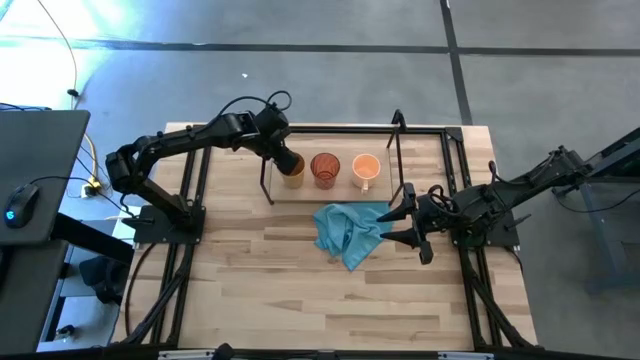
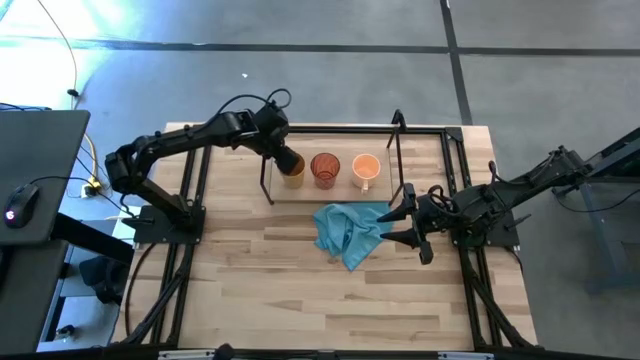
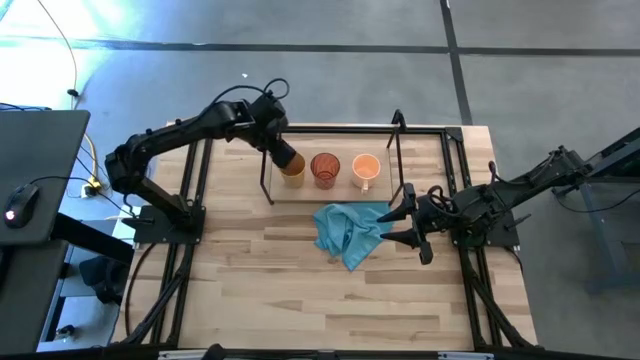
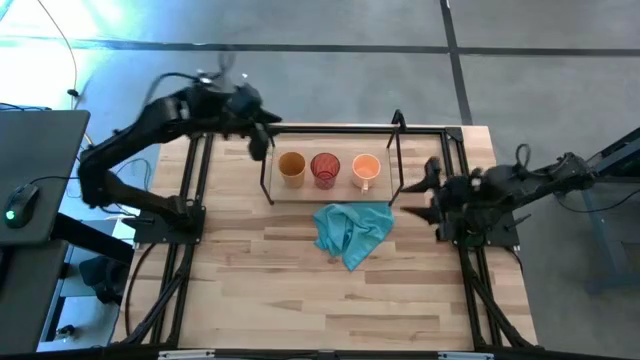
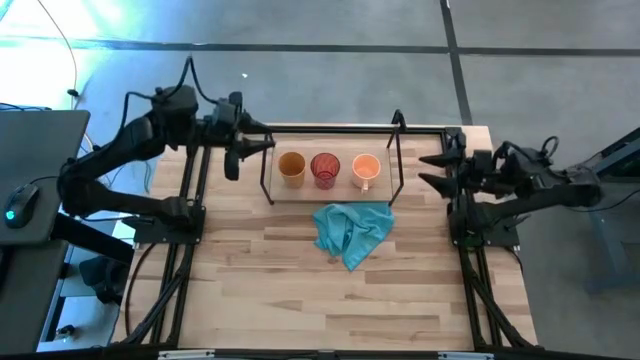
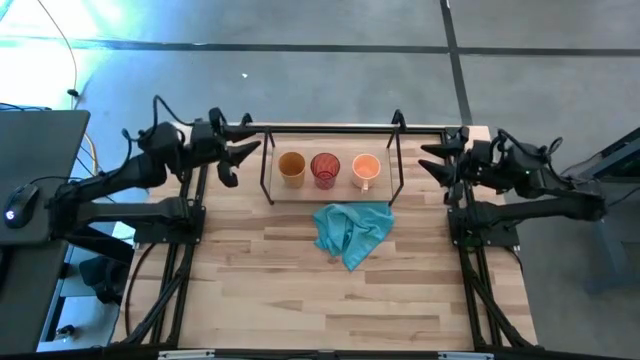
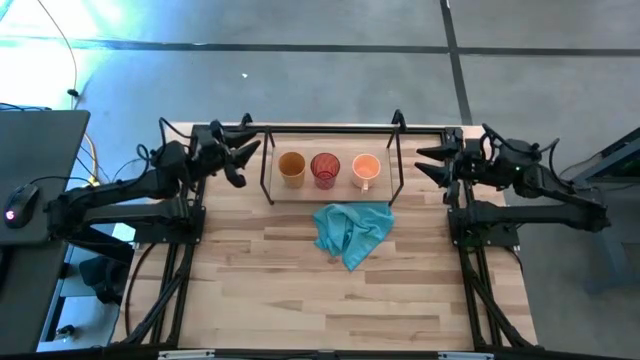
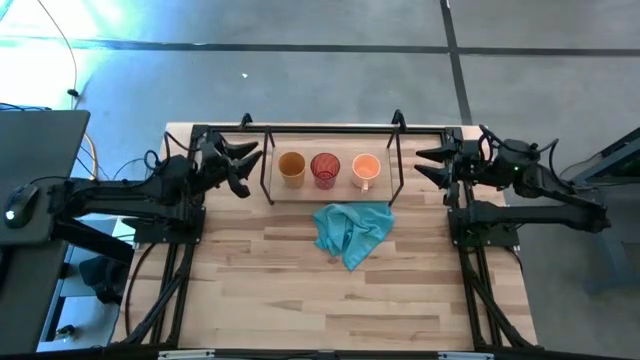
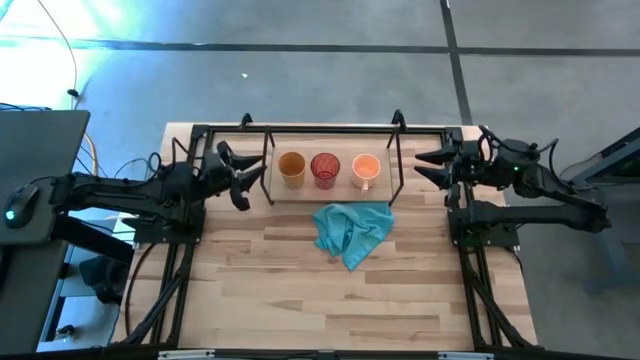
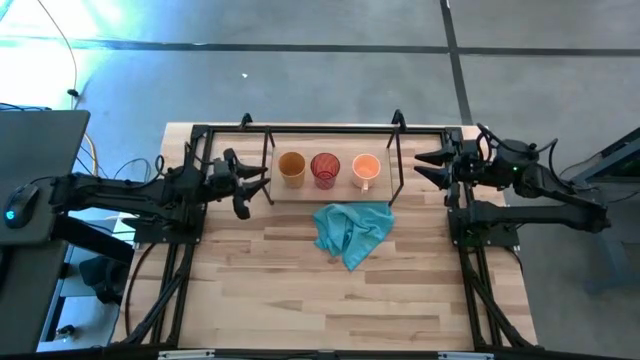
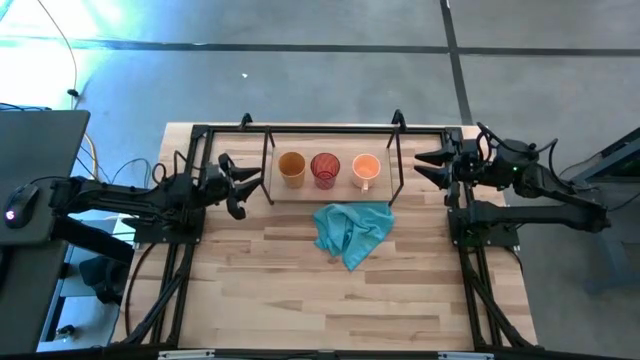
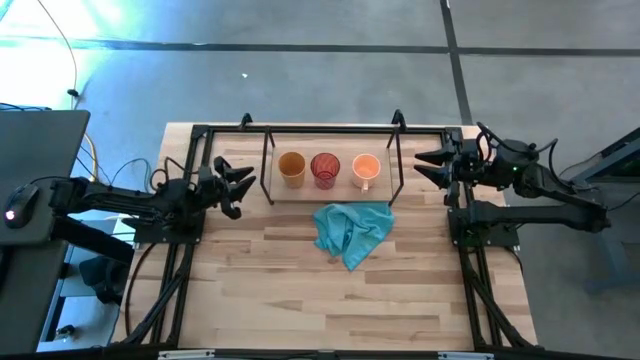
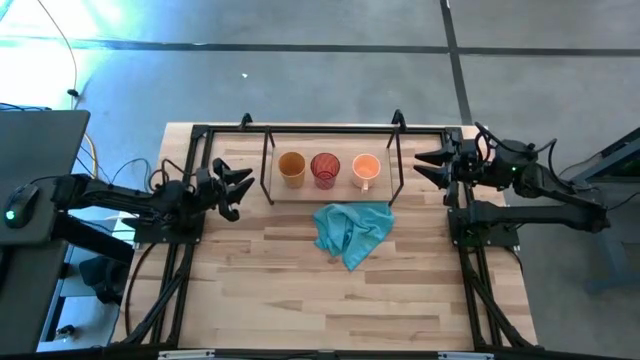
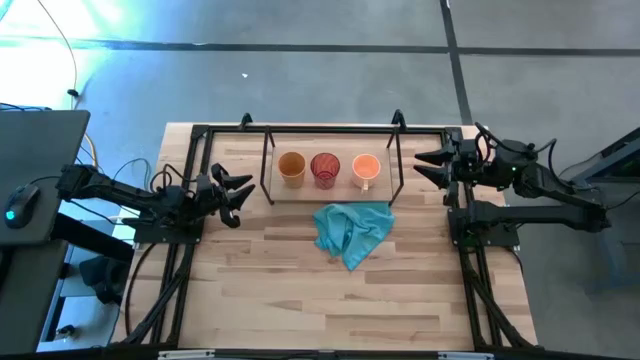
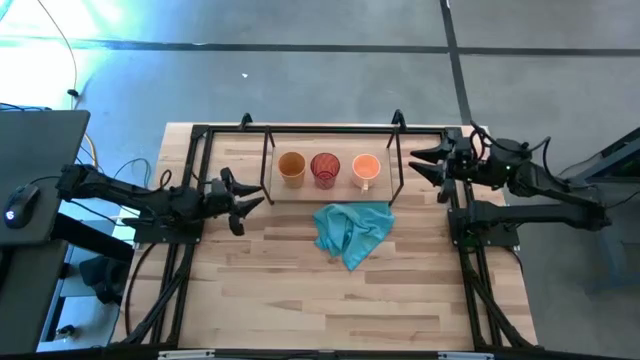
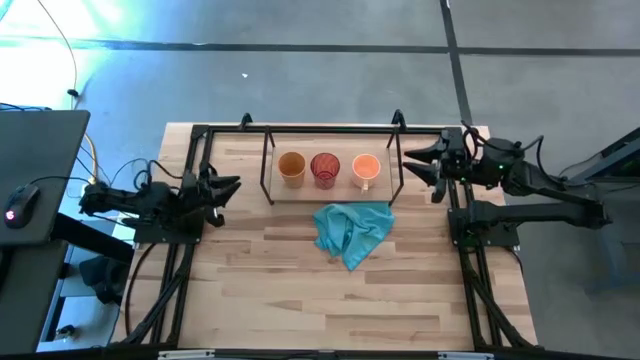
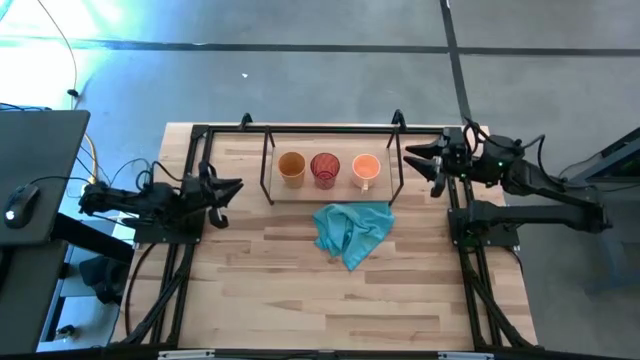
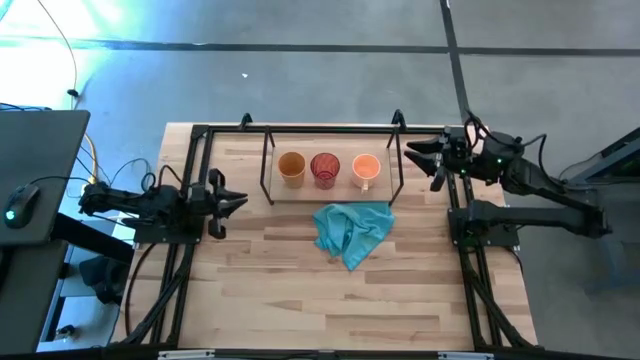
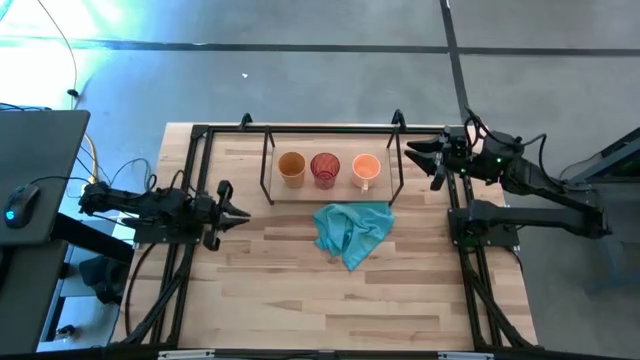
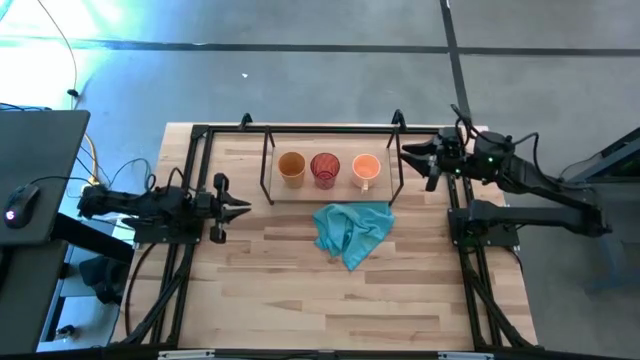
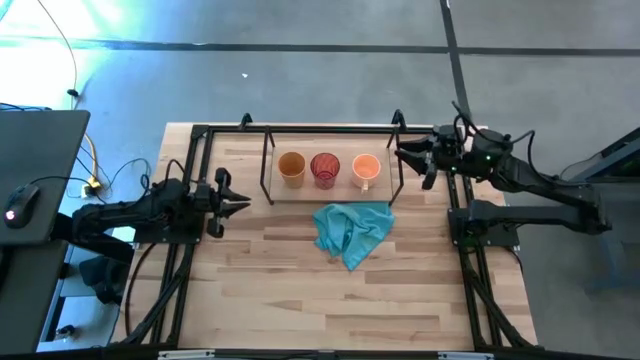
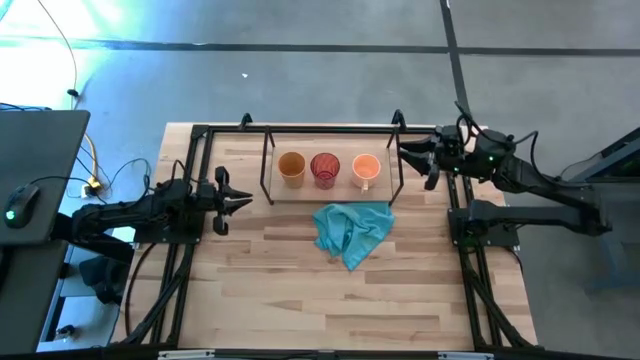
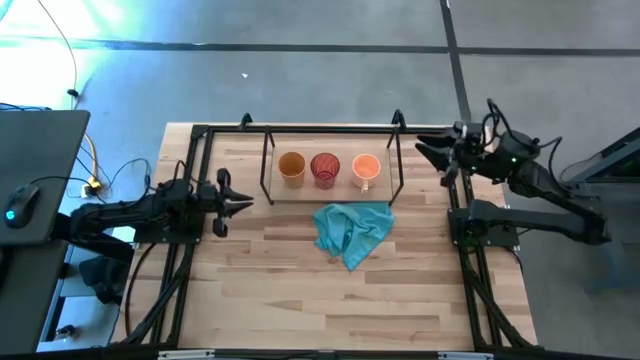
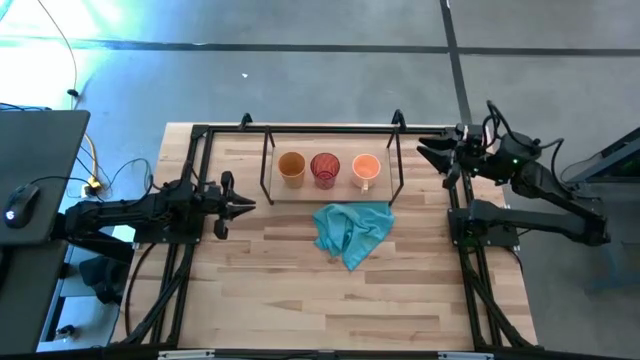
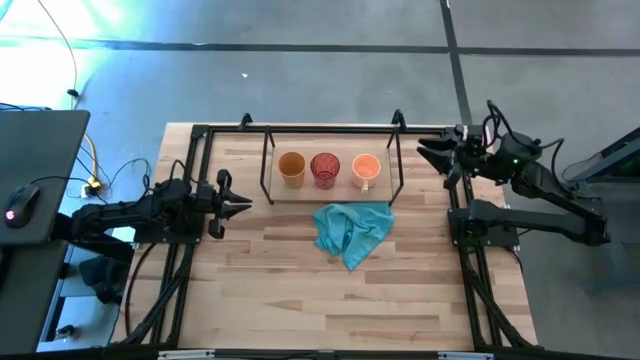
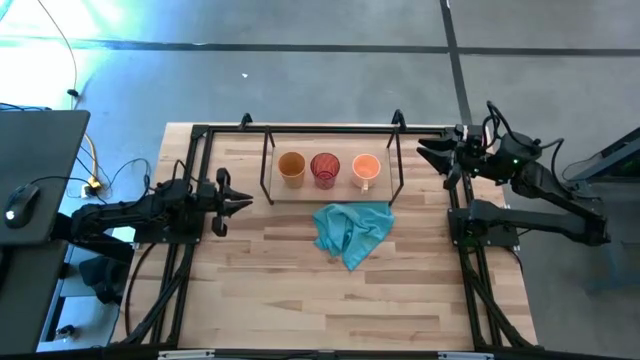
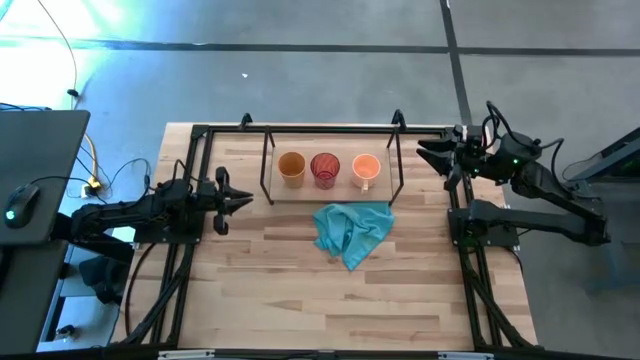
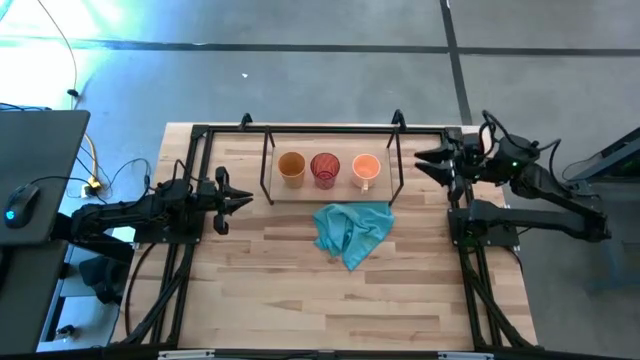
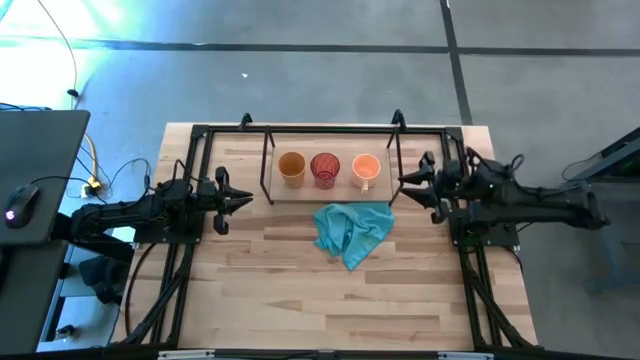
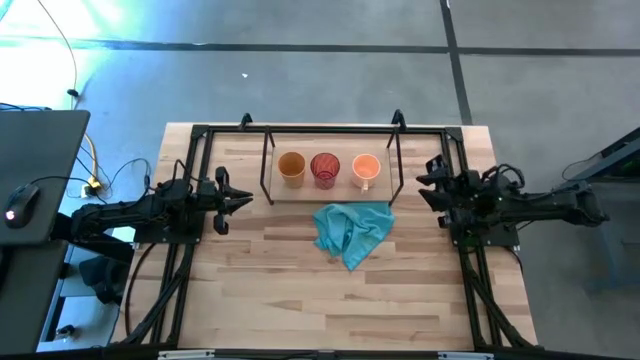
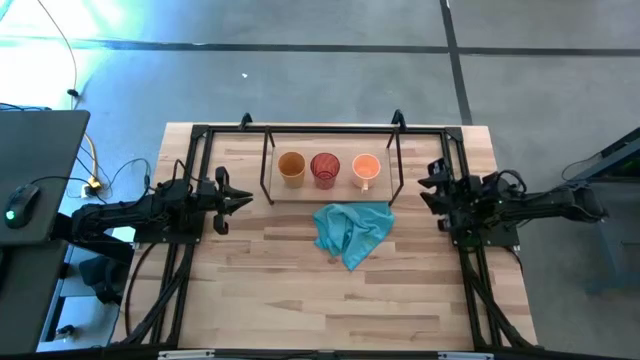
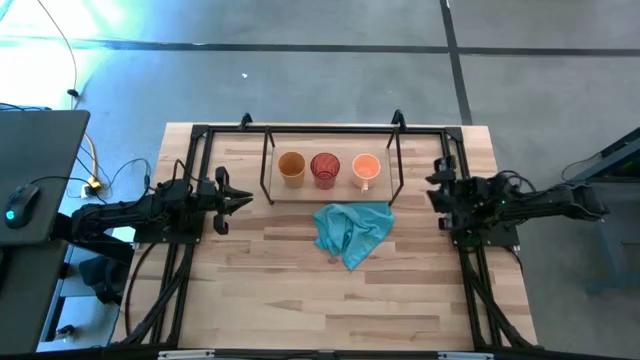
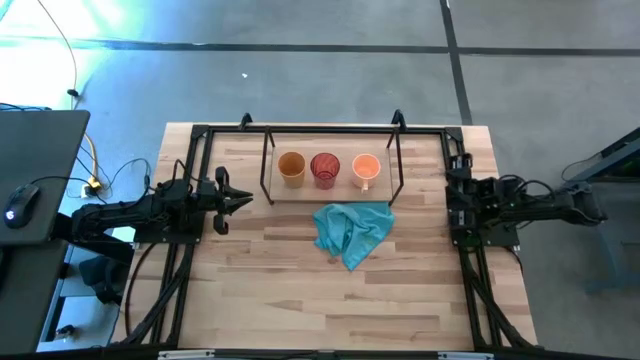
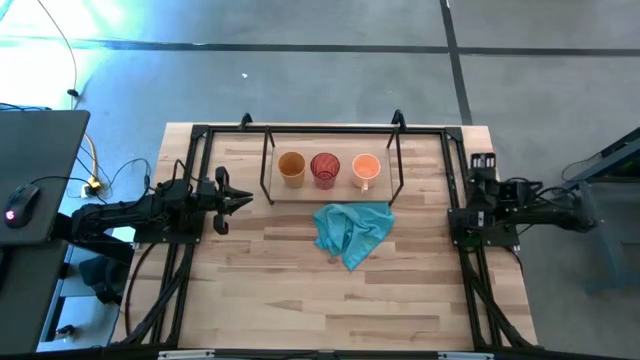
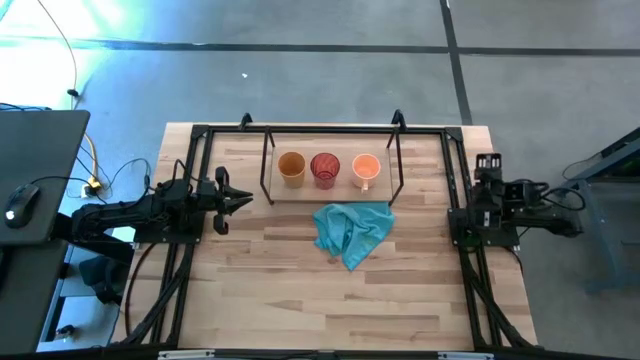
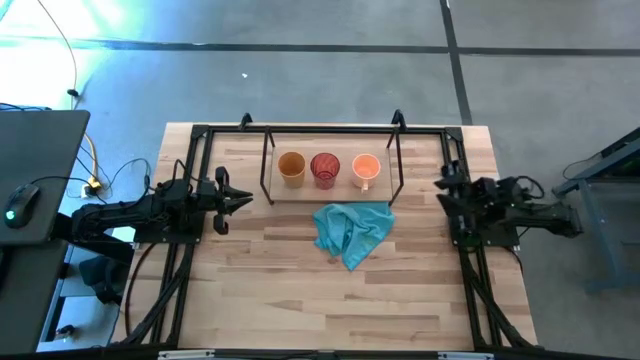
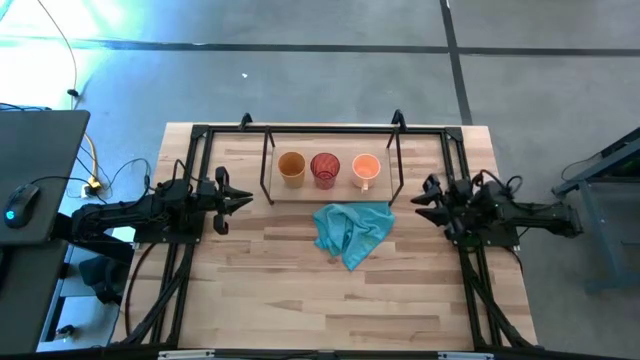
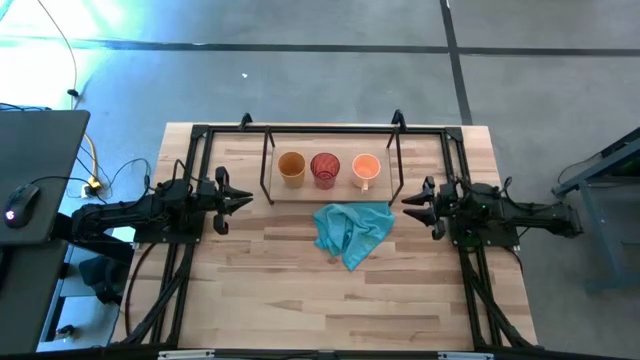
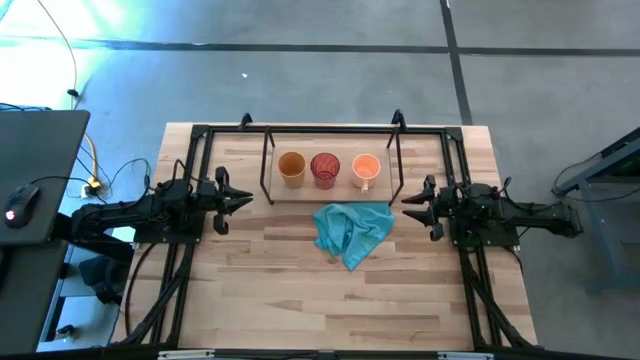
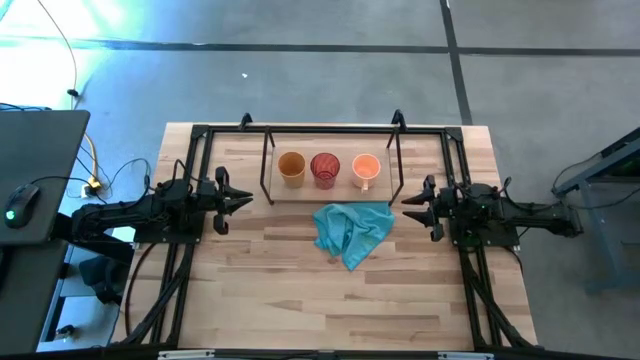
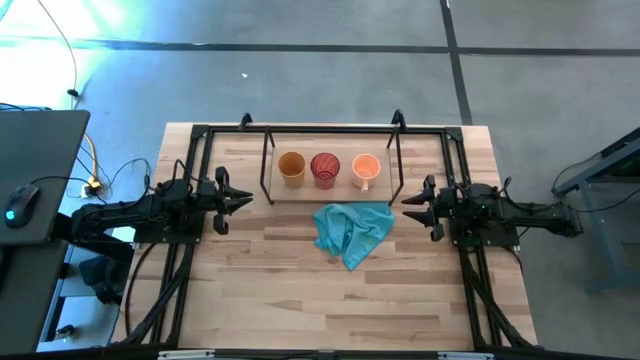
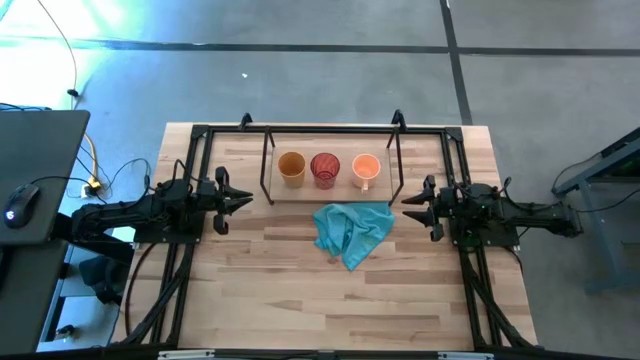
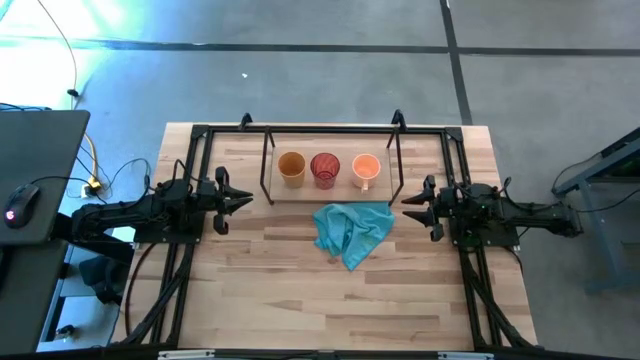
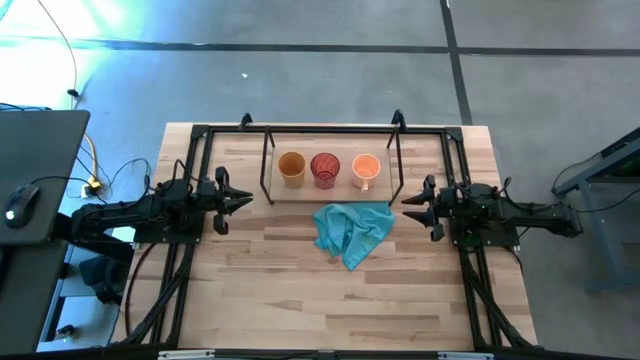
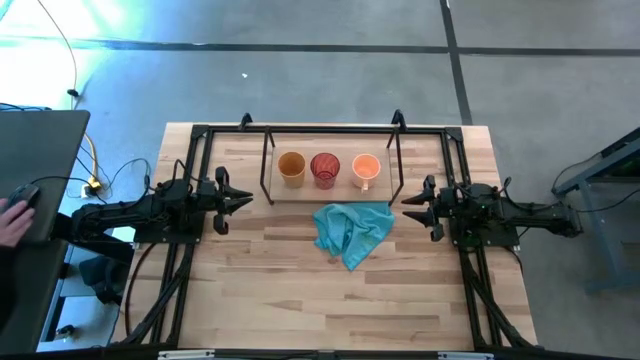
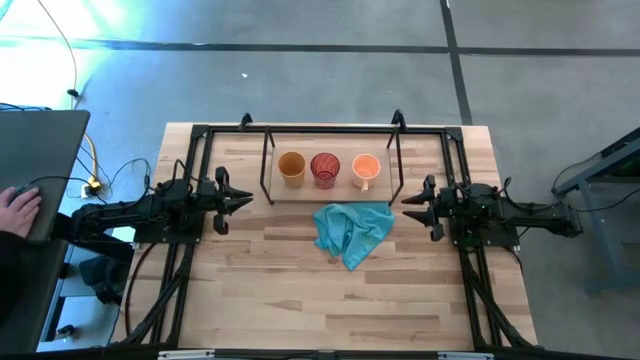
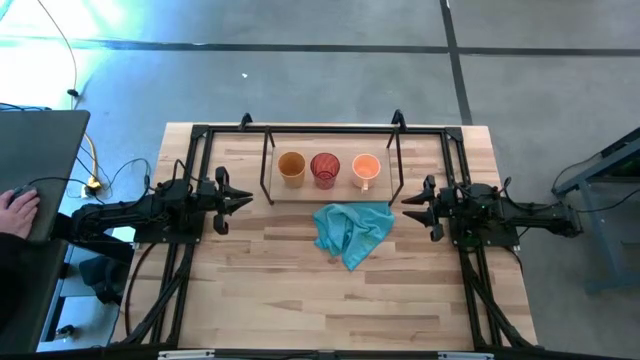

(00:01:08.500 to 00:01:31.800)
Task: Stack small to large cups/mugs on shelf
Return to Home Position
